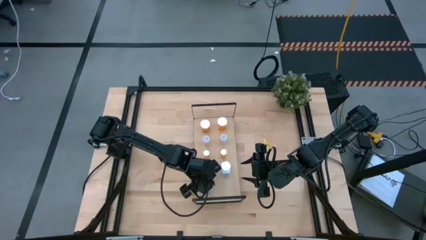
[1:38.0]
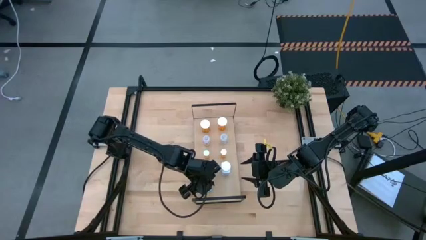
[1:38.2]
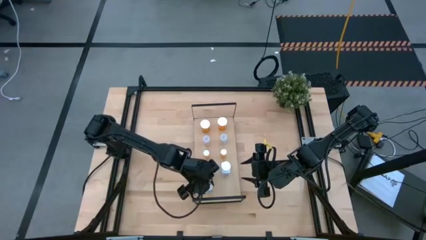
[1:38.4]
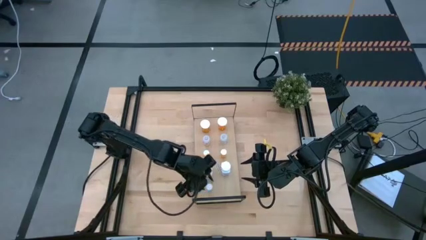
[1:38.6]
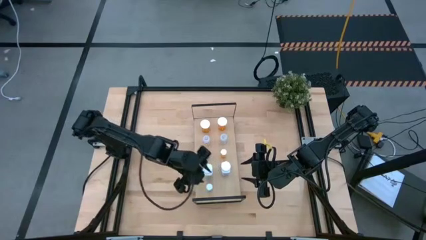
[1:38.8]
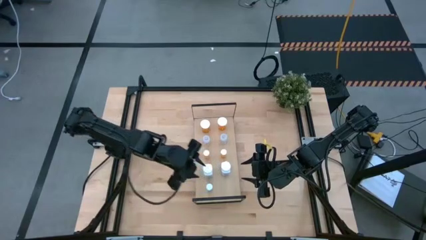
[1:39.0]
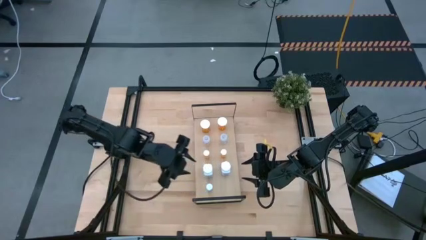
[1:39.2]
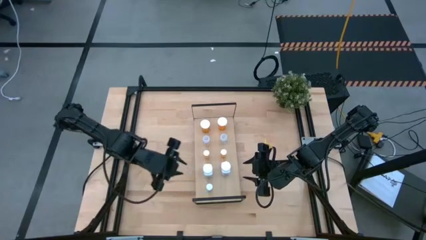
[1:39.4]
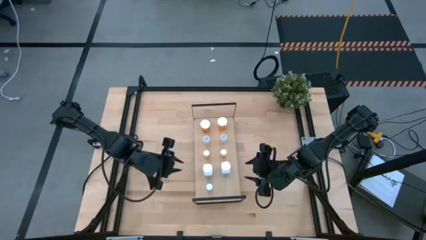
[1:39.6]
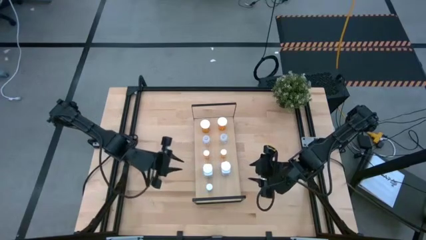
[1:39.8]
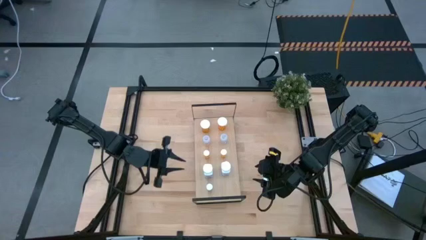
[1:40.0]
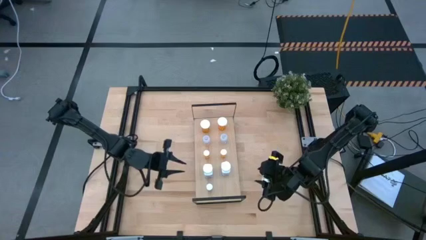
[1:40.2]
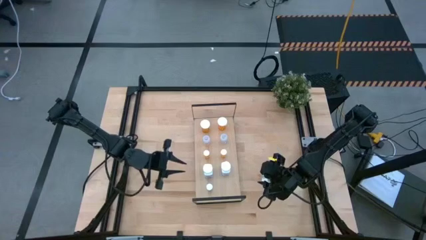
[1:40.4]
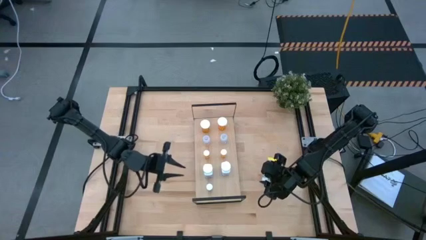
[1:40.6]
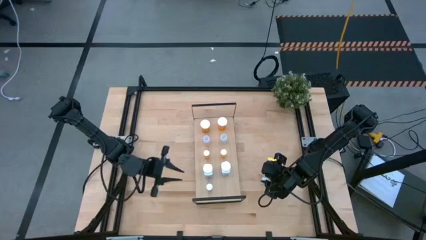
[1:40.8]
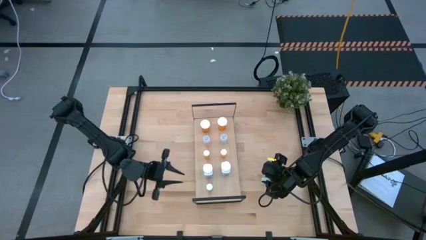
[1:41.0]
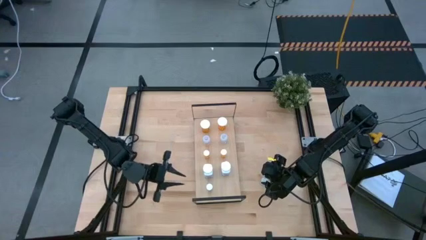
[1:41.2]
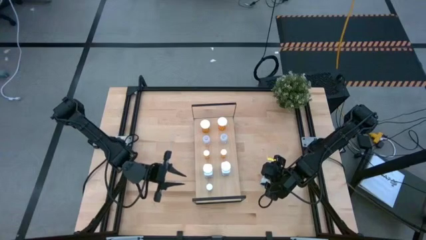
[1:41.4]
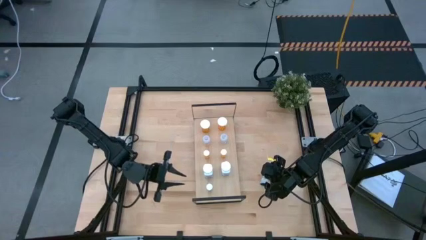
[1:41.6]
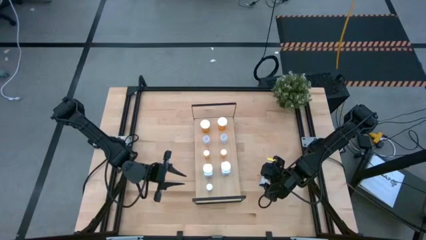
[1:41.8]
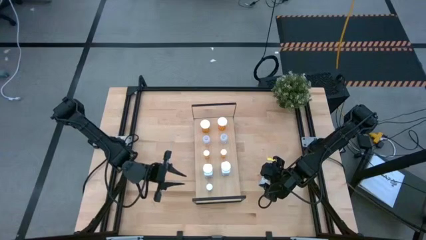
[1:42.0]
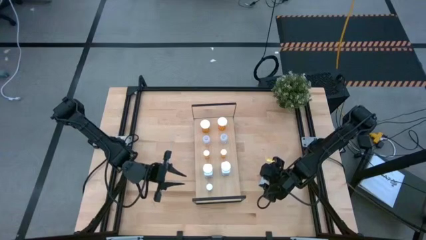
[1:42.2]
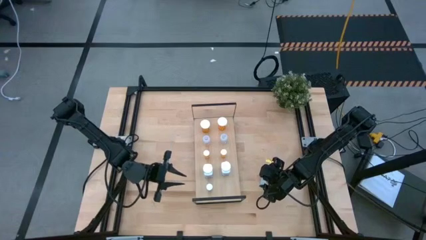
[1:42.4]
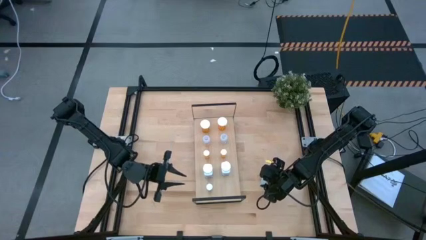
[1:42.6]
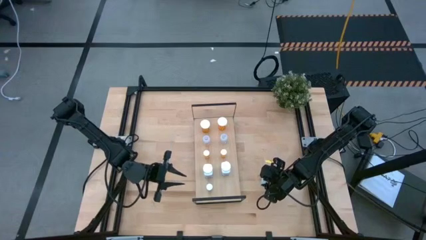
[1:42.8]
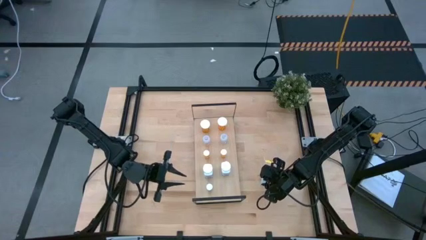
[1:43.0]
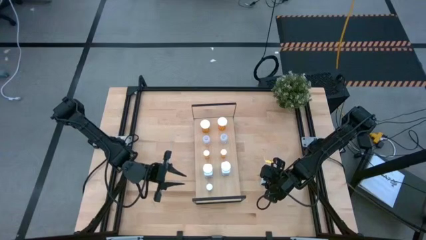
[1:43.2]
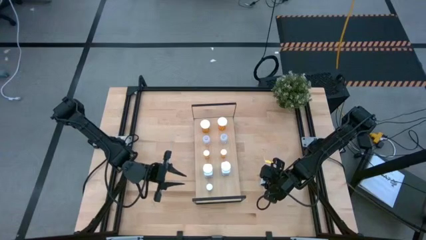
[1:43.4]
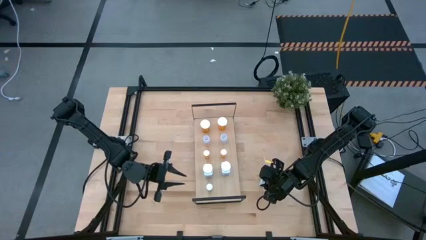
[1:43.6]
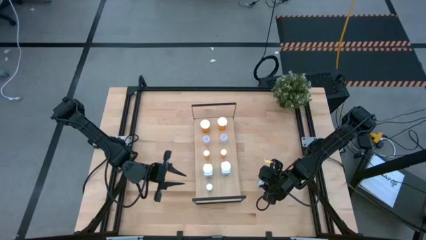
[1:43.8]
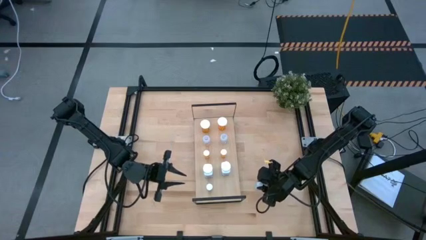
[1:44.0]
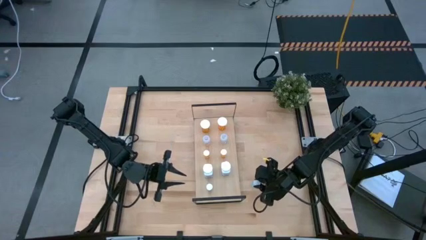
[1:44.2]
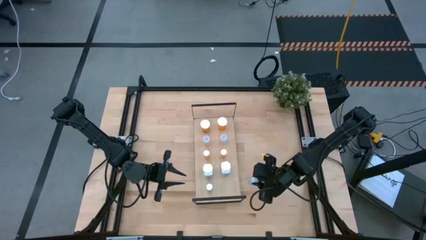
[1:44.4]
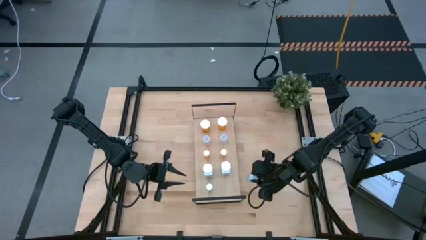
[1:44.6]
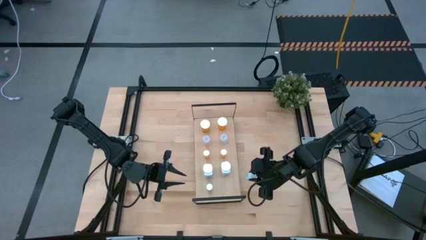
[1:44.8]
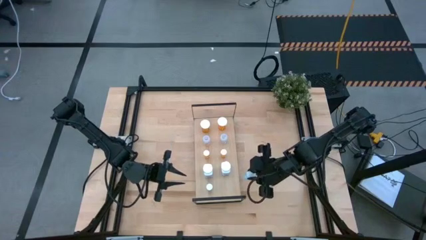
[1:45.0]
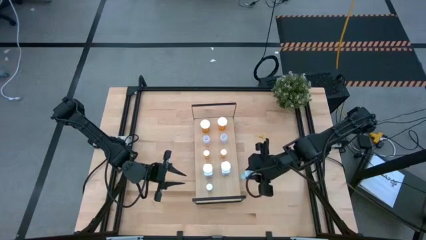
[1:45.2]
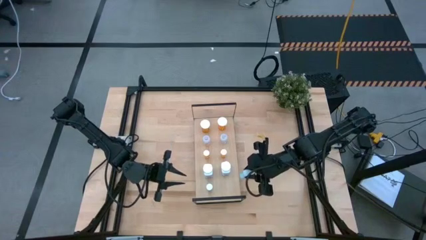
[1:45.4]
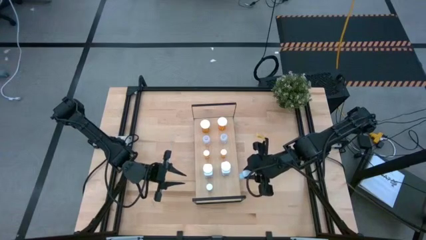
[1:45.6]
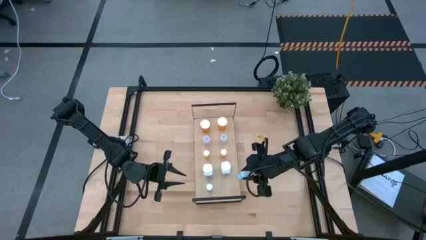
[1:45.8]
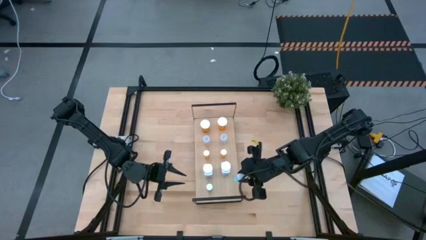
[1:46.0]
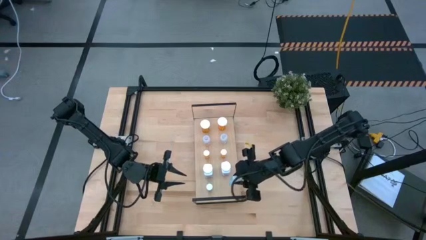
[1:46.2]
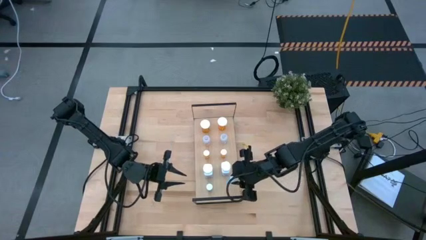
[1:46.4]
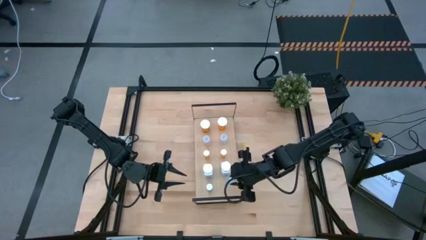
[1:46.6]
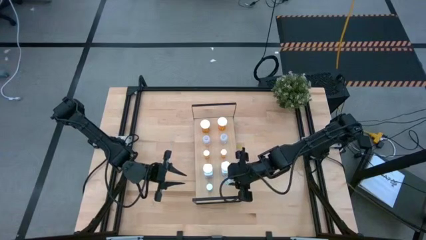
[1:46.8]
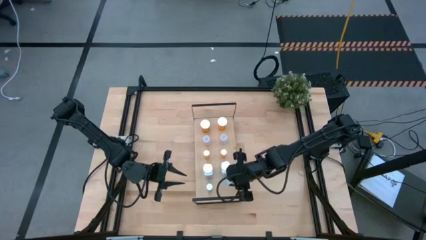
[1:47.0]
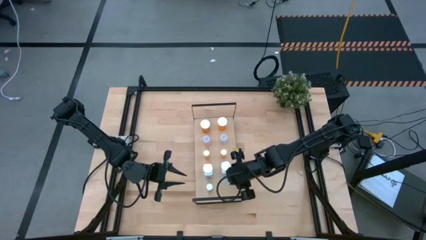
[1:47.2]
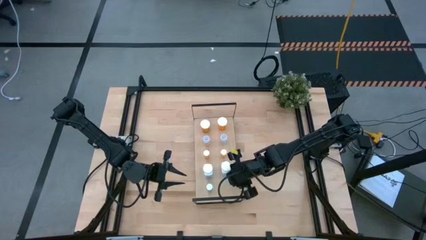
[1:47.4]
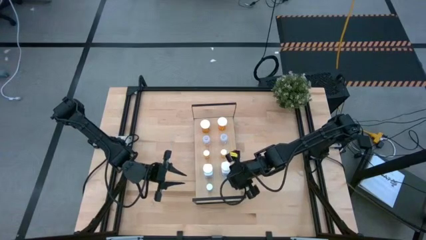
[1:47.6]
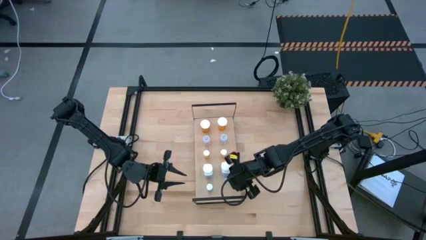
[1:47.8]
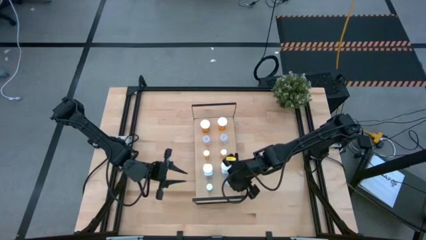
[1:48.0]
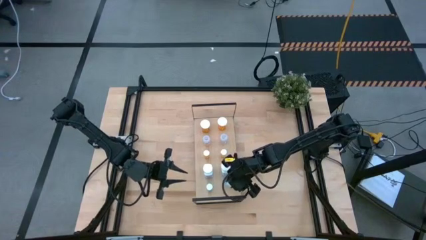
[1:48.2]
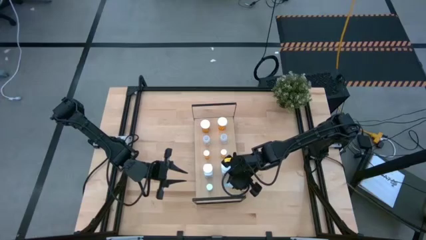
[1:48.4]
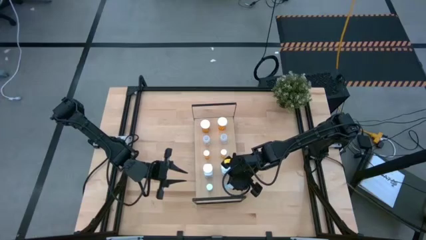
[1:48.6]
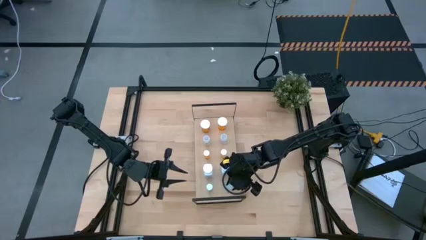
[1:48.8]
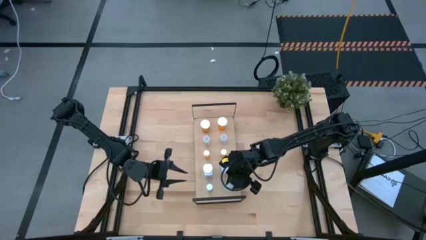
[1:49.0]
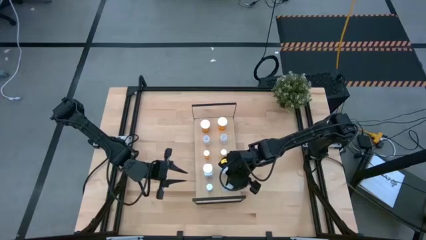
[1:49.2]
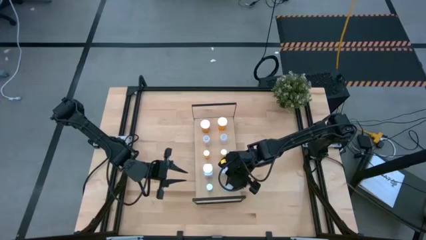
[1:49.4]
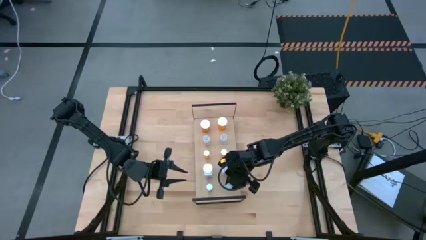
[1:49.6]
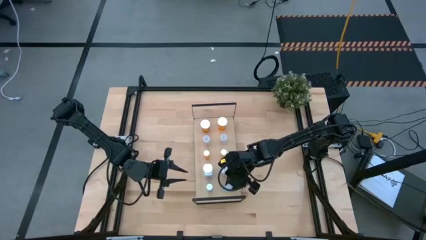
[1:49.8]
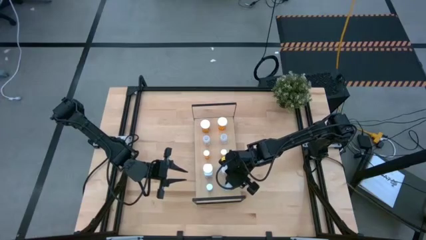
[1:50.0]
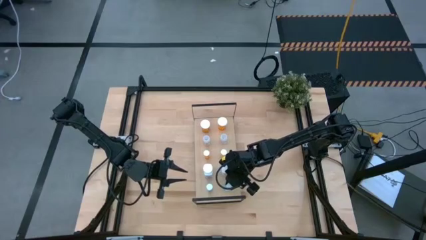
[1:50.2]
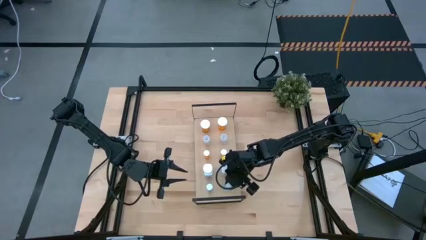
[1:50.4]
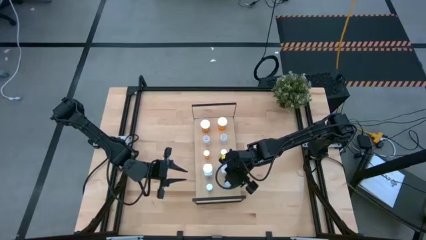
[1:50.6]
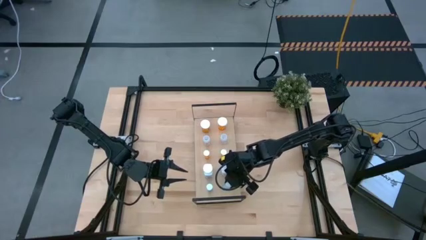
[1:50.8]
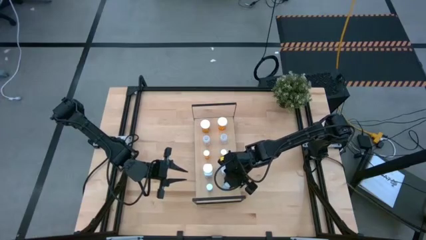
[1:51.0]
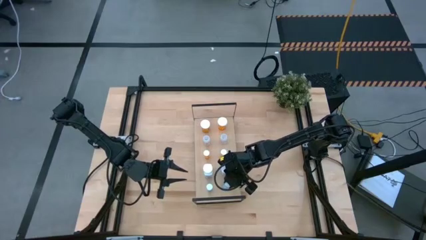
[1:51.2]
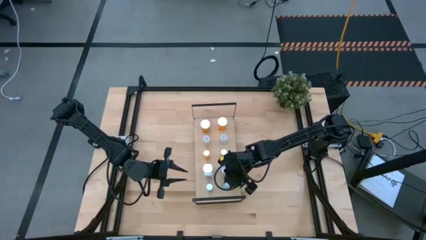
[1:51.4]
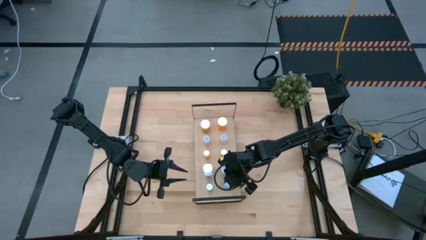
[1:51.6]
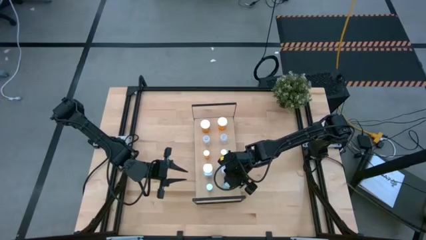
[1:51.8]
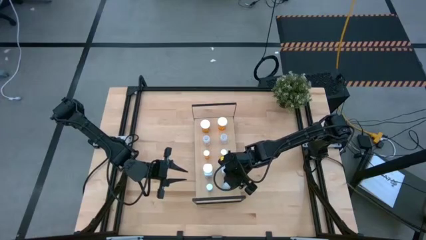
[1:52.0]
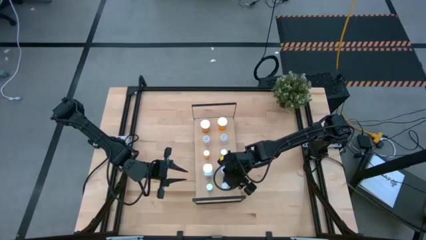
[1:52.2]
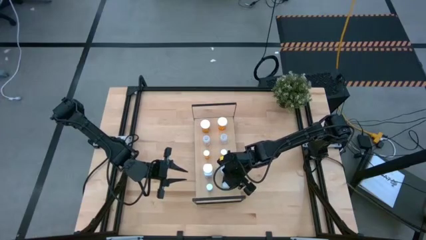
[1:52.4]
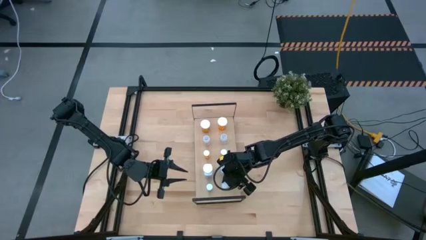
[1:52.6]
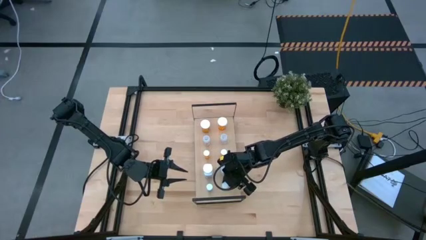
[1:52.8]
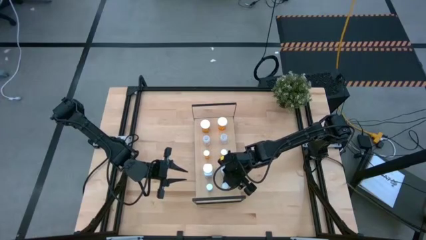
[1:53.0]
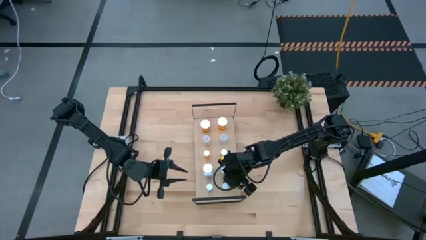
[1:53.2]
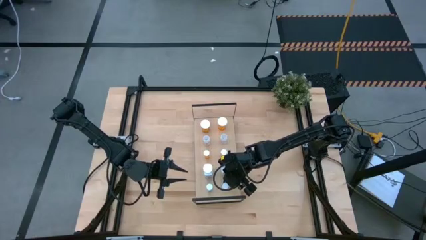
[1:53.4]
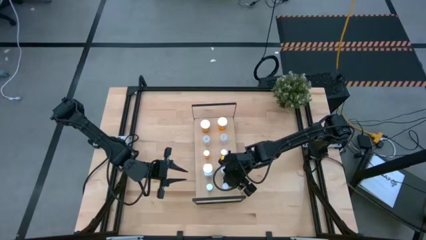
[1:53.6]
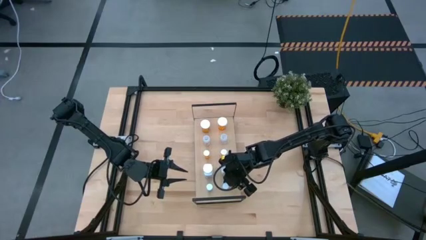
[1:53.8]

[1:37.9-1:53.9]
Task: Pick and place medicine bottles onto shelf by color
Put the blue medicine bottle on the shelf
